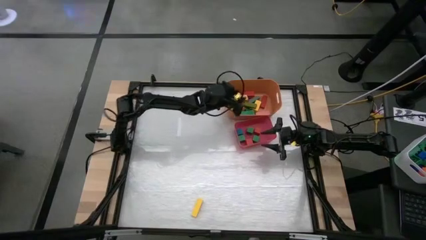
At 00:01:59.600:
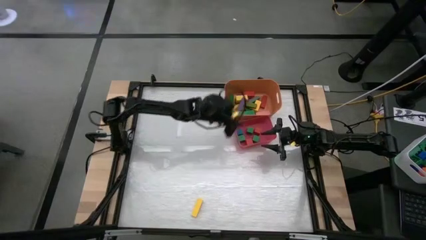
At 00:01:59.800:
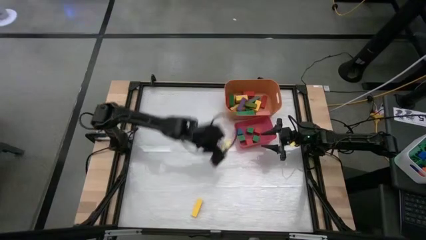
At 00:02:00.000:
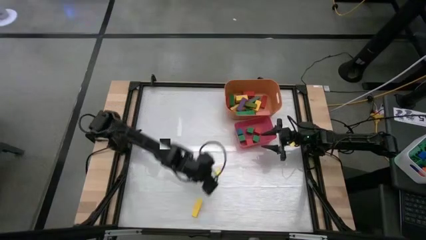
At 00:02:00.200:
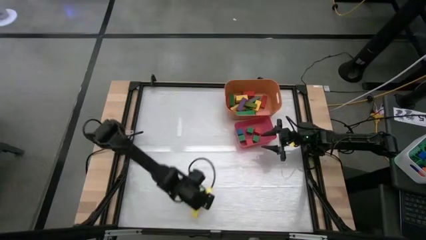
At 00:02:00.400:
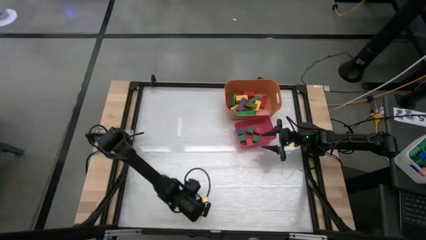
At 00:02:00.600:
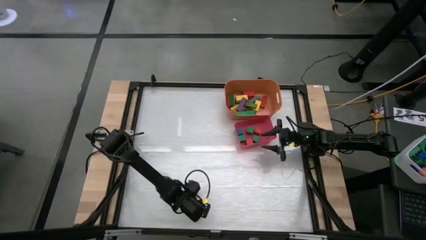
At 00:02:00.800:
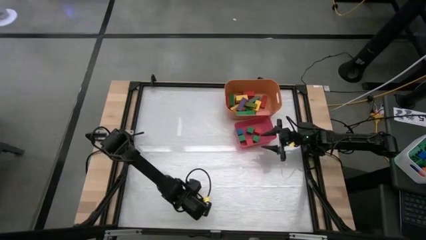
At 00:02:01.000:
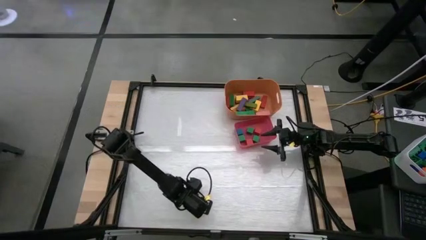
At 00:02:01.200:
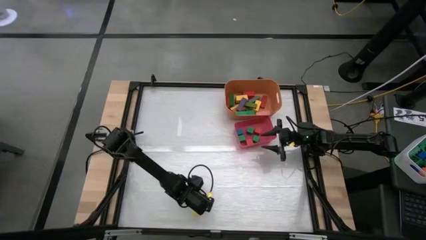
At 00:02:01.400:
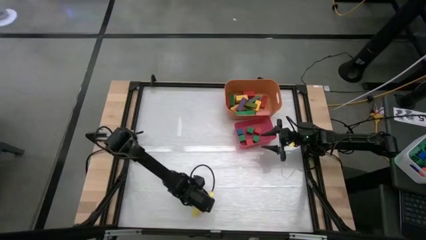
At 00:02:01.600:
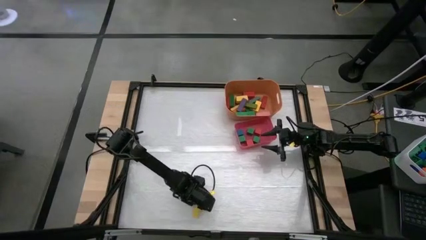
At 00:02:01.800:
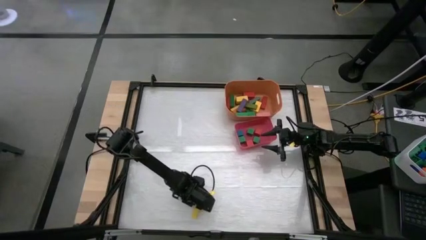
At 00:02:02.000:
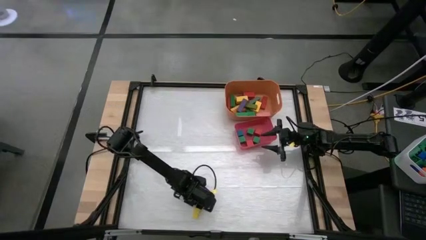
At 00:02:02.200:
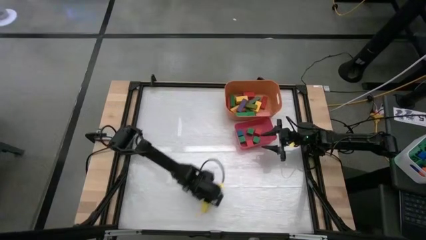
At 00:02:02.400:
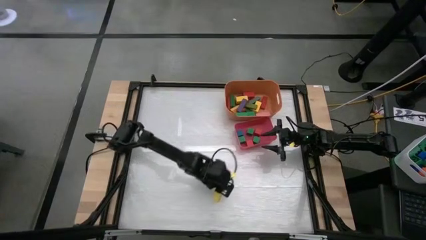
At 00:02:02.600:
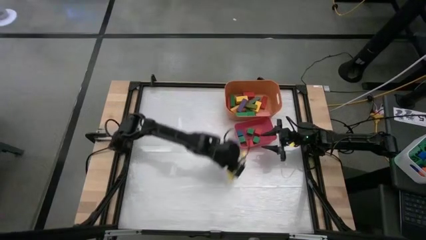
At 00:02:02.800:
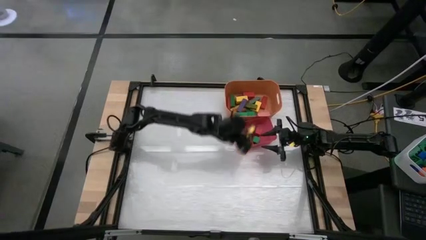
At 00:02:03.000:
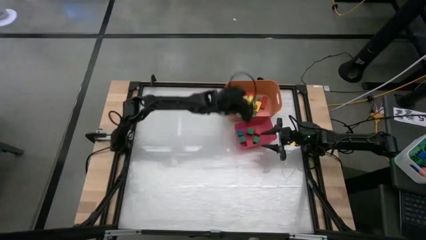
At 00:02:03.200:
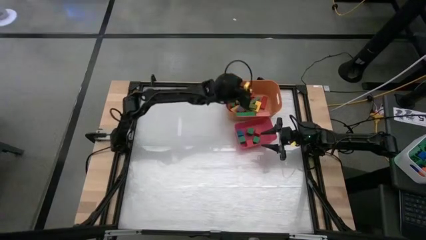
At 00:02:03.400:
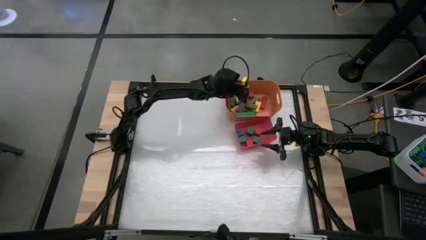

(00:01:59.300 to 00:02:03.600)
Task: Sort blocks by size
Put the yellow rectangle block into the orange bin

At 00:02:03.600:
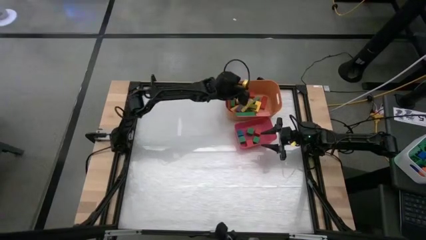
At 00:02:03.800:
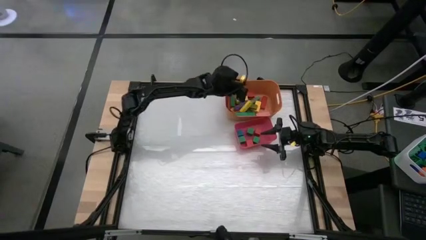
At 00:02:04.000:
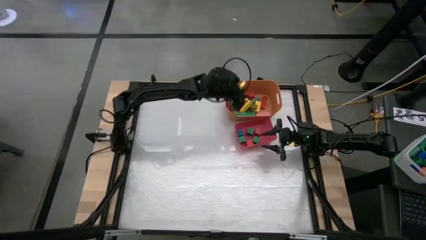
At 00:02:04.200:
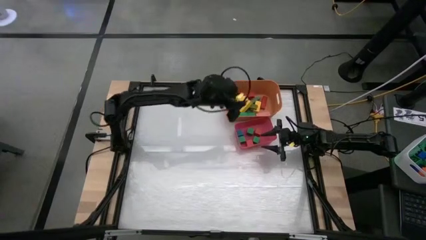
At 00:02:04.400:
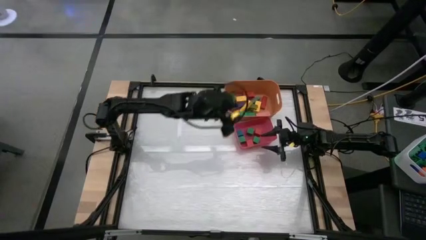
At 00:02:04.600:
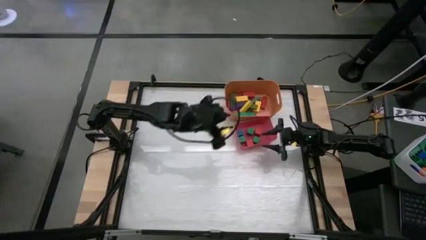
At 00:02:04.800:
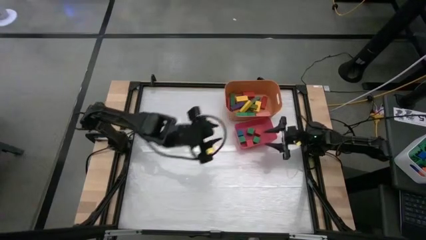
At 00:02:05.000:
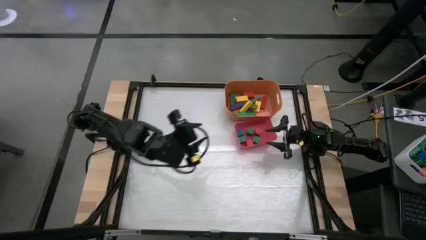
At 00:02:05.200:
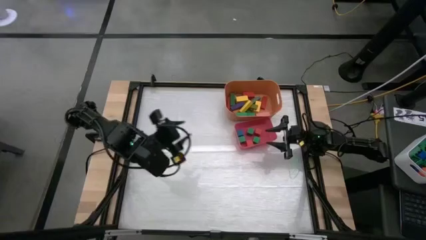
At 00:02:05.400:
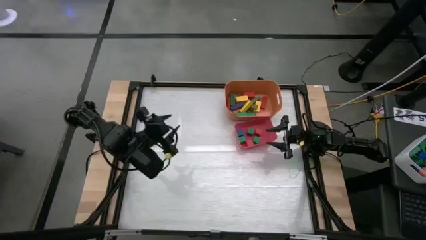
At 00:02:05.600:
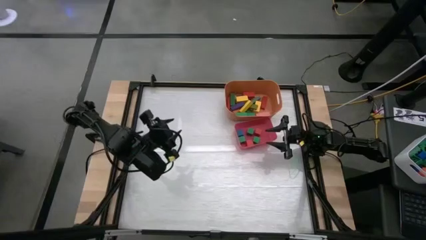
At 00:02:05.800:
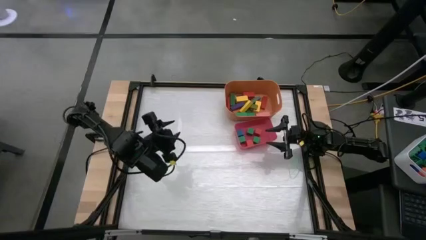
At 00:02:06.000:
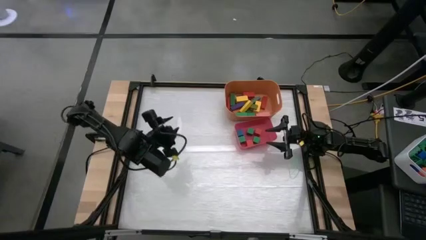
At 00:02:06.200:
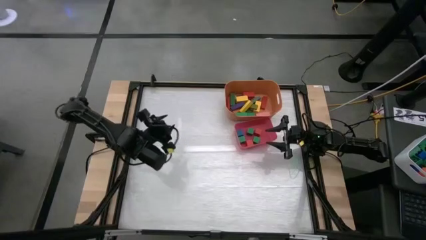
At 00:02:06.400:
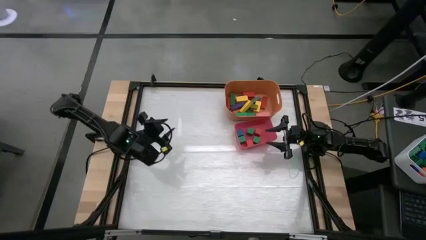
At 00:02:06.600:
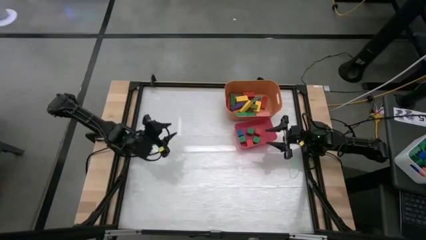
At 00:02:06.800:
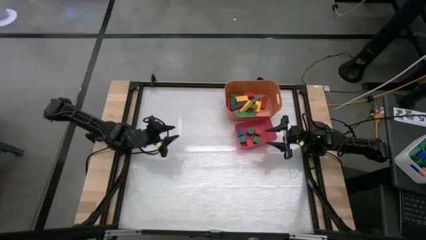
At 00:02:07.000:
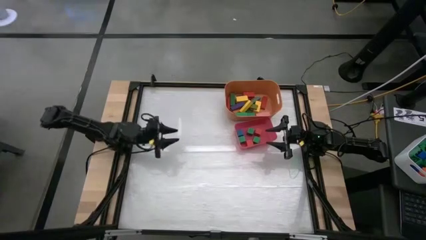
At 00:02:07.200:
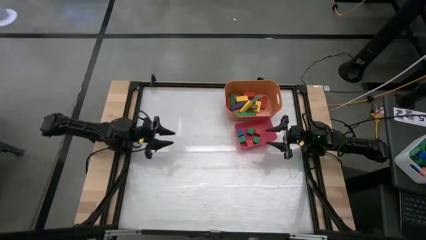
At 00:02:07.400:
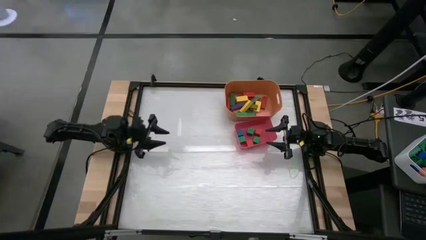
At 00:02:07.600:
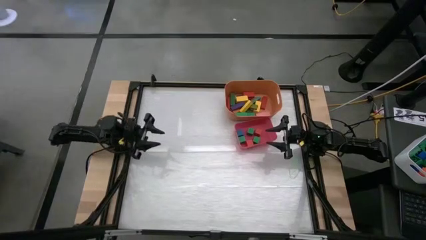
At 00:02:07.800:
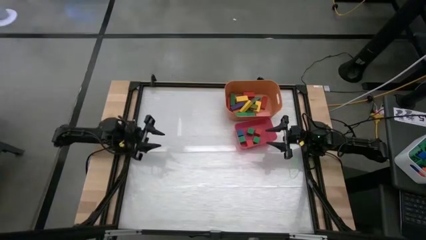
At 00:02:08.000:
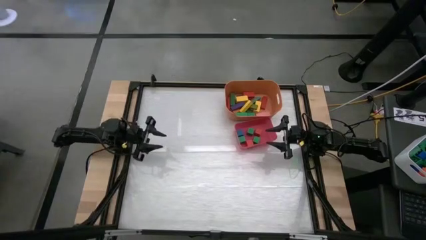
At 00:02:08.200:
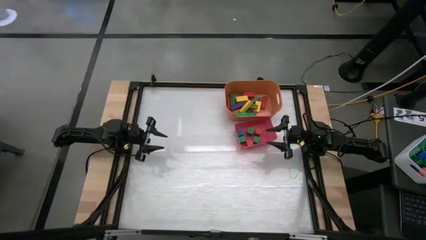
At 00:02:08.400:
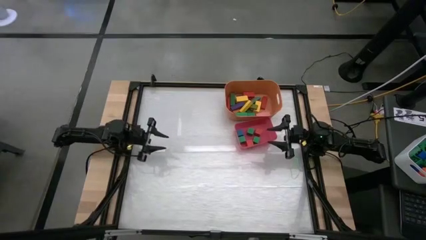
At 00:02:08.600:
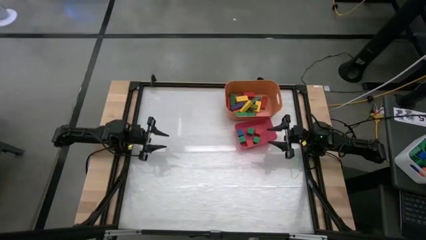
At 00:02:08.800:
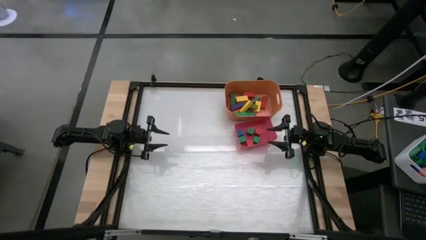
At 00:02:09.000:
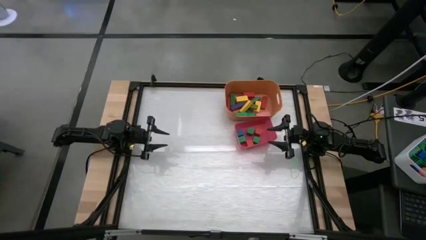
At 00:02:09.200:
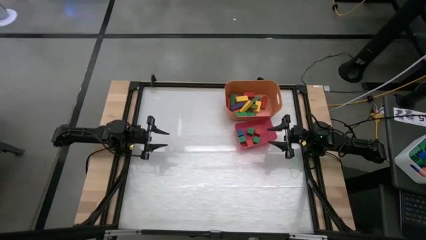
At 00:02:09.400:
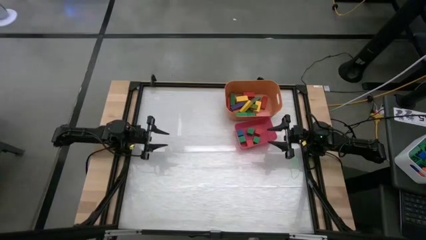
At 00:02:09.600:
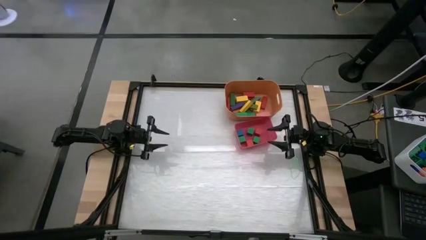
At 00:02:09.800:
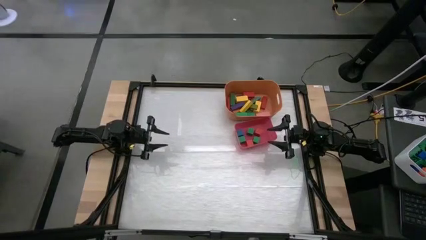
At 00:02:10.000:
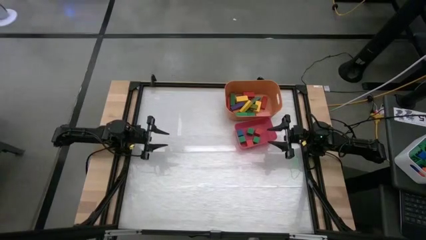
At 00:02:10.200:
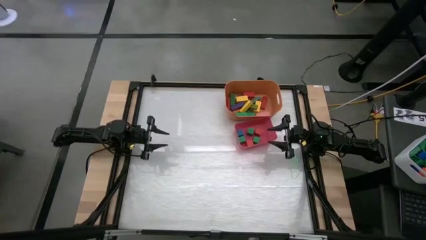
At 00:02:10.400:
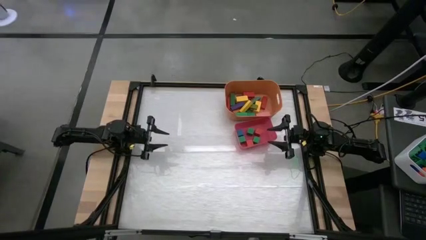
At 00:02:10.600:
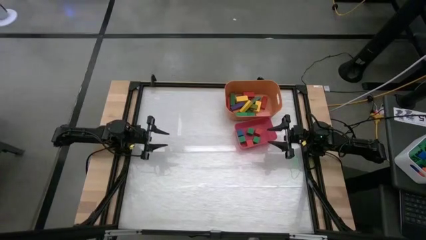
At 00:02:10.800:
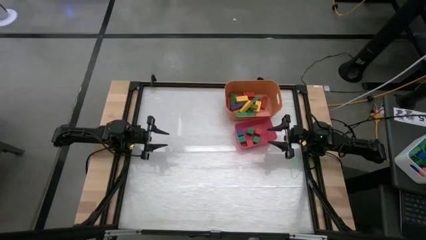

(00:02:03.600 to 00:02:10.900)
Return to Home Position

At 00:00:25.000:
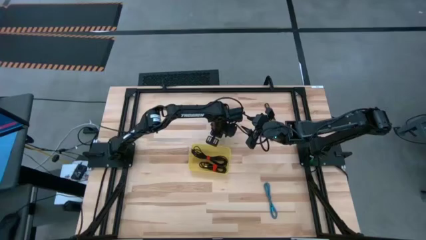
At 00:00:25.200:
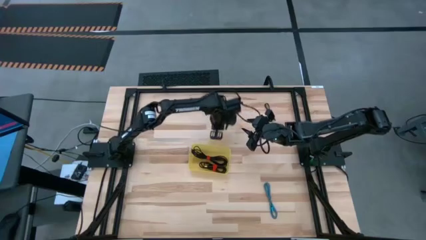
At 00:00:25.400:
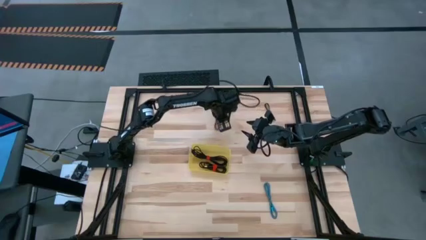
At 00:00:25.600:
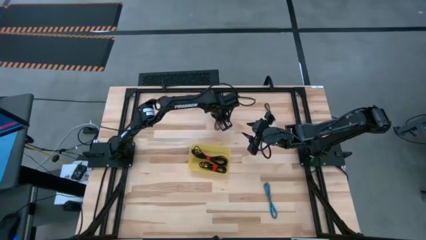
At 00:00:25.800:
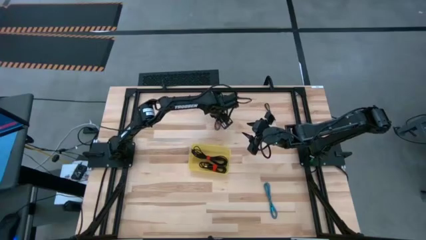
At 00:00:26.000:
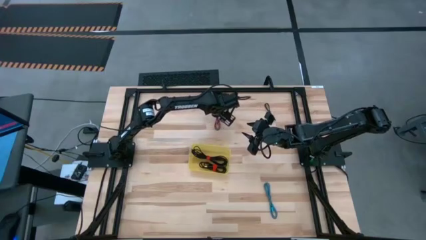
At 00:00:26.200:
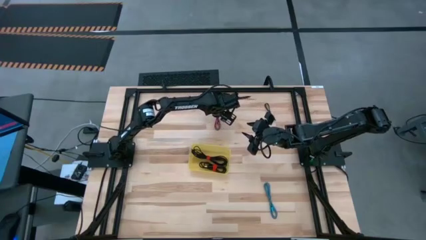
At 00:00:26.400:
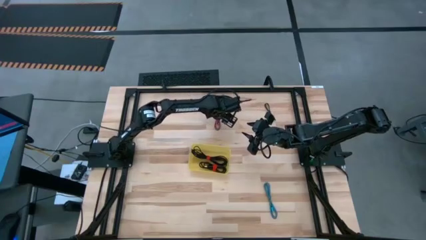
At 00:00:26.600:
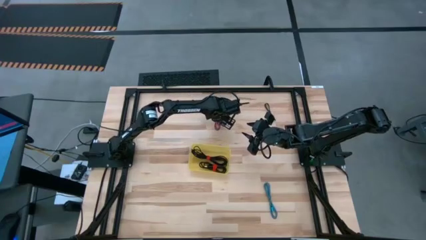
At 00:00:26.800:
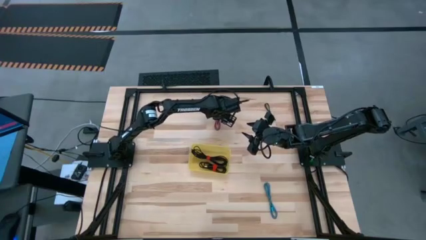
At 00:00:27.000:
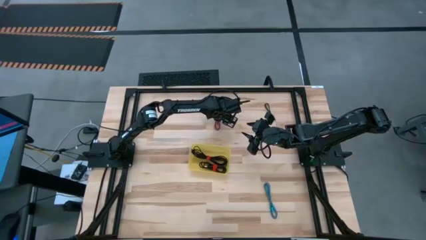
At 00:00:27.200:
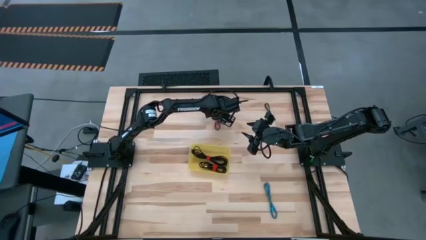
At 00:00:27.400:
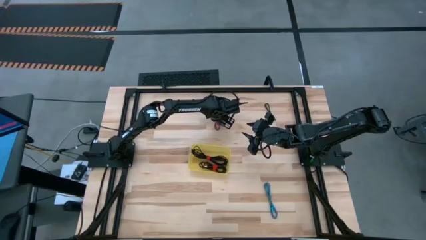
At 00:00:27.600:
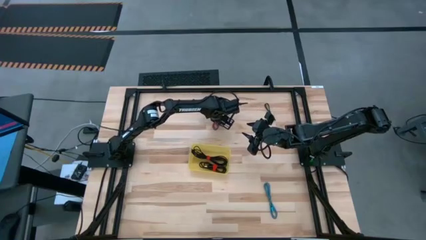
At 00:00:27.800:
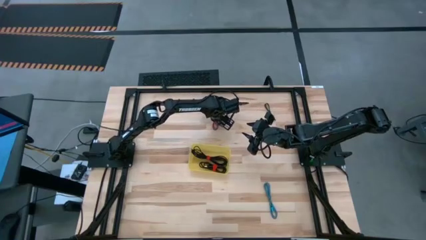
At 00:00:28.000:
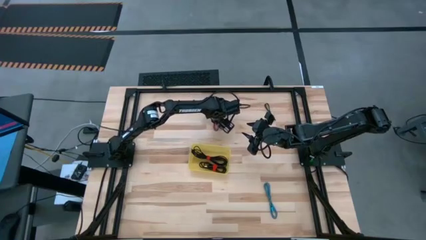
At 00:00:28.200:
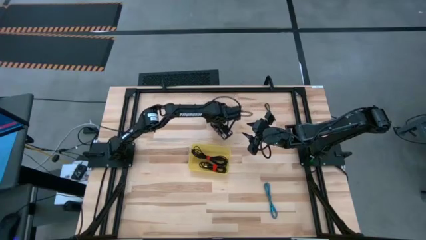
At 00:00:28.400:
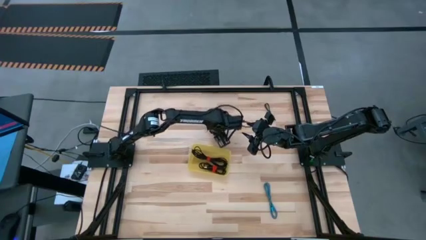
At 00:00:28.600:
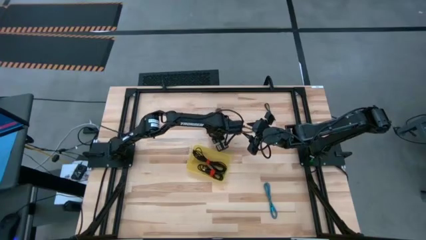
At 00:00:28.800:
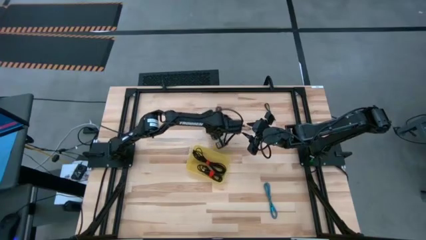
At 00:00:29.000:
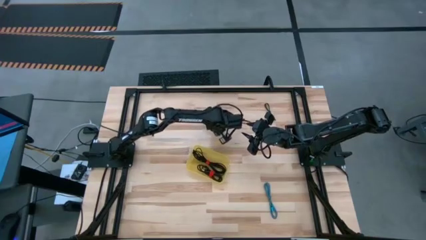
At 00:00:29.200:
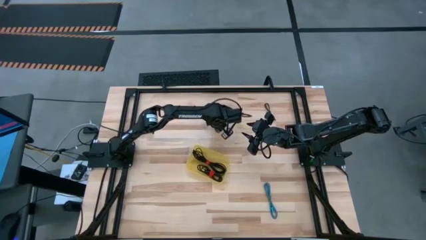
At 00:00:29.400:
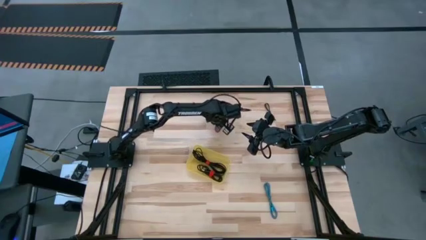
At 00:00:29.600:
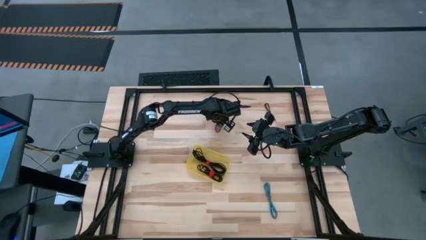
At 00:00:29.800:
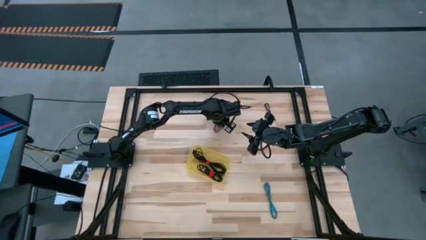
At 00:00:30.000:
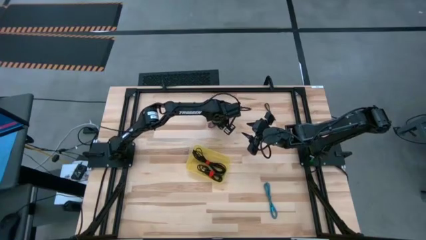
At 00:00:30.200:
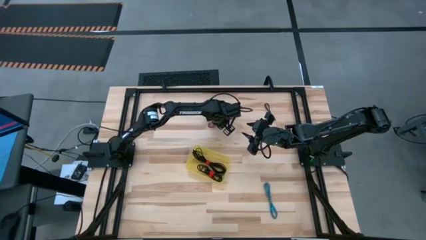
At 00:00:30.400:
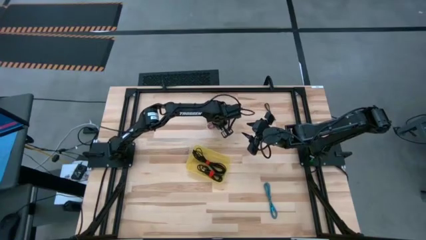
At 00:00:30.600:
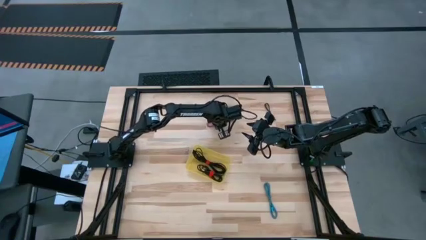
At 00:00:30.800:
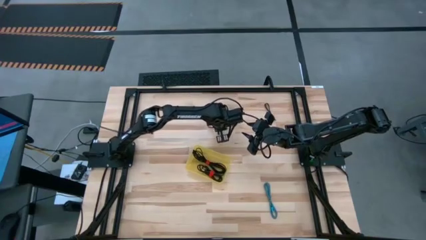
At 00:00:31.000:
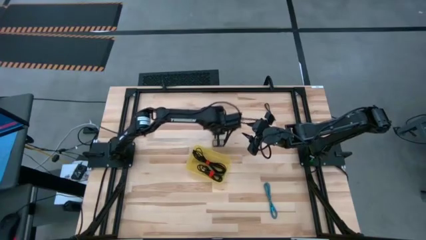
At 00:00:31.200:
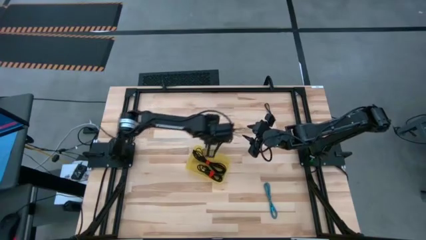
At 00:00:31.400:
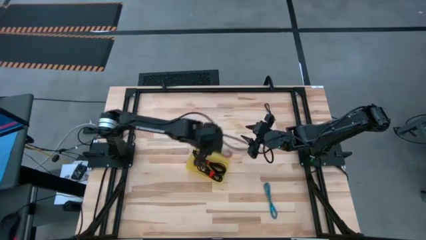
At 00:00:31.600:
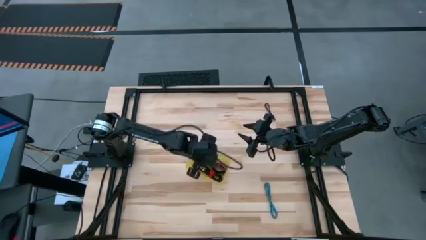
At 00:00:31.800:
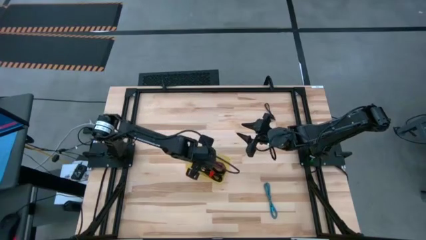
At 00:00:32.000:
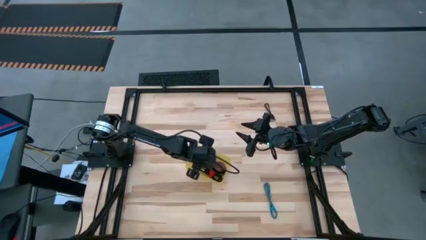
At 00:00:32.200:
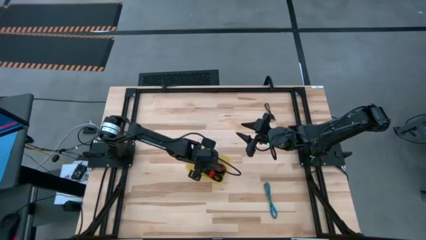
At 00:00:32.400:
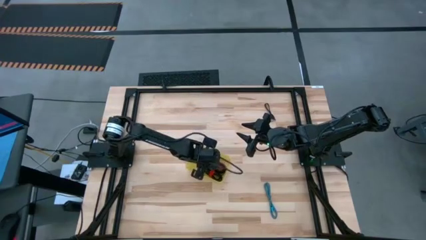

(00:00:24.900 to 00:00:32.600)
Task: Pick and place USB-C Cables
Put the pink charger cable into the yellow bin
